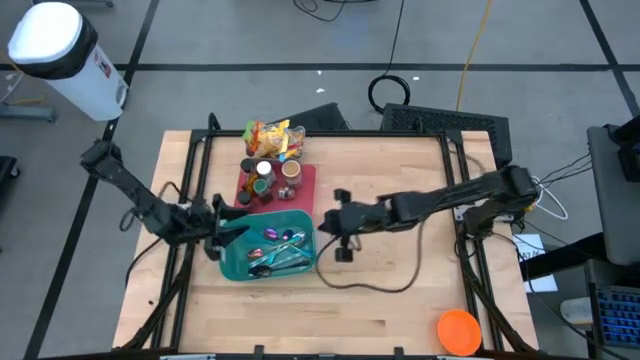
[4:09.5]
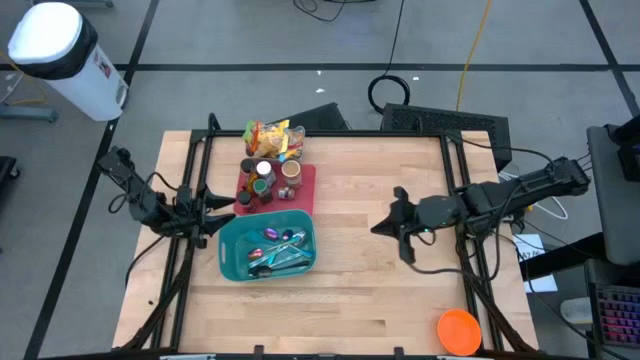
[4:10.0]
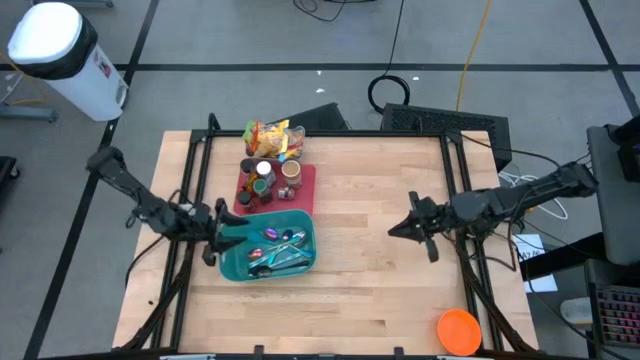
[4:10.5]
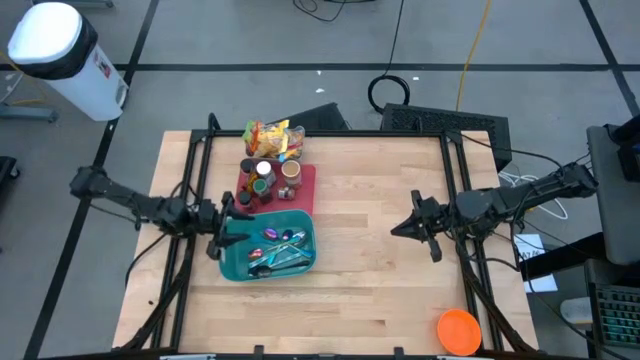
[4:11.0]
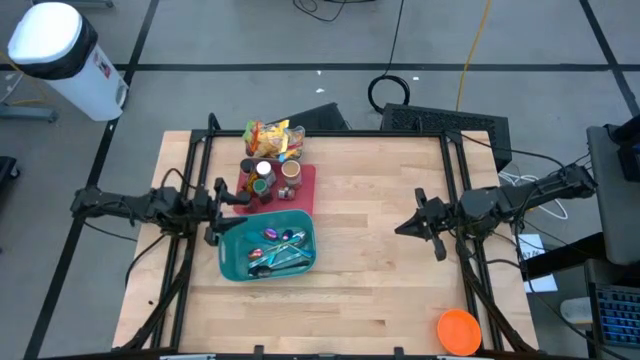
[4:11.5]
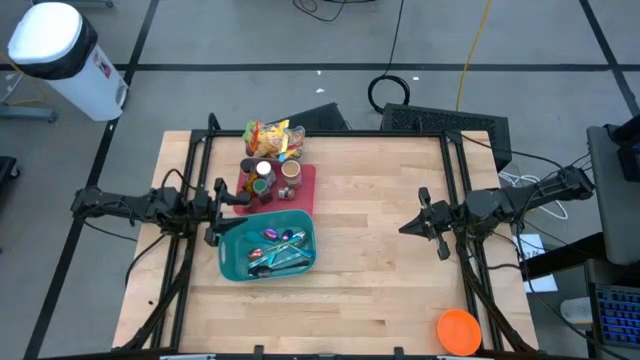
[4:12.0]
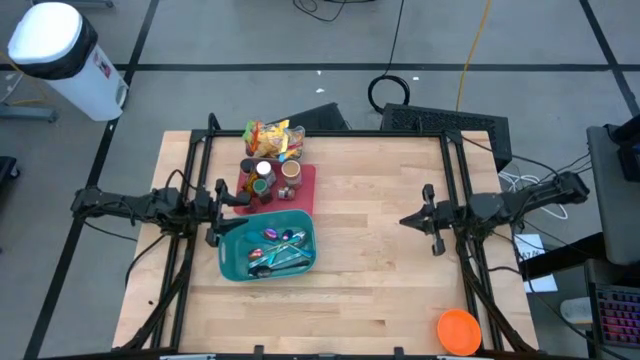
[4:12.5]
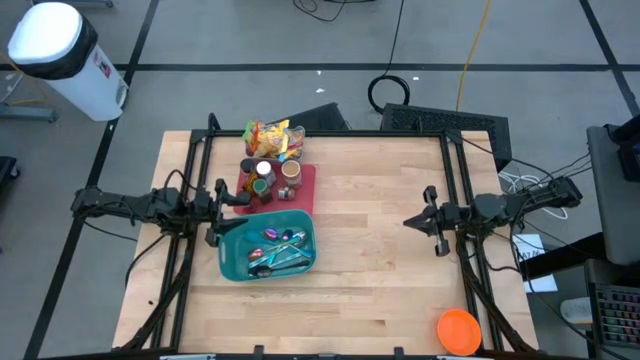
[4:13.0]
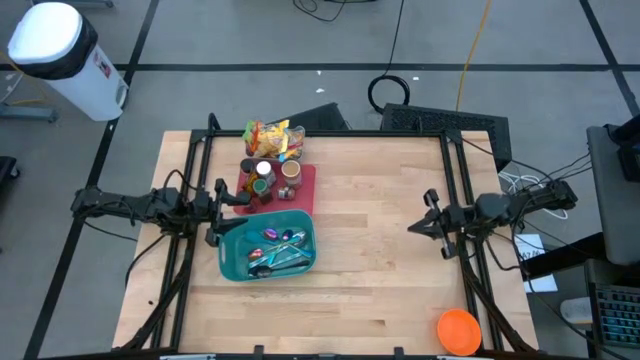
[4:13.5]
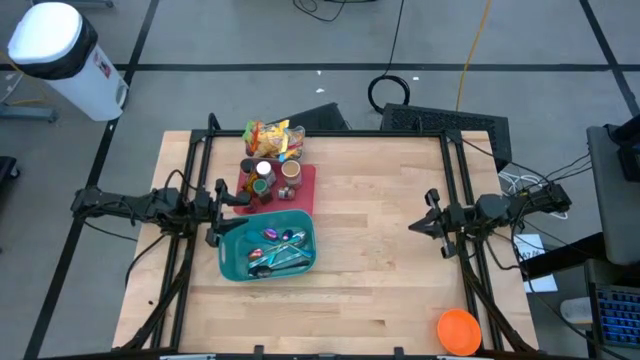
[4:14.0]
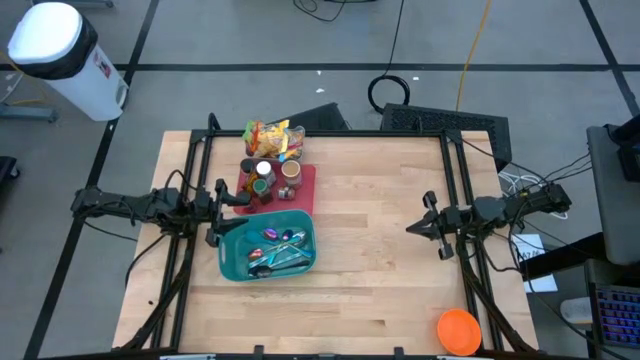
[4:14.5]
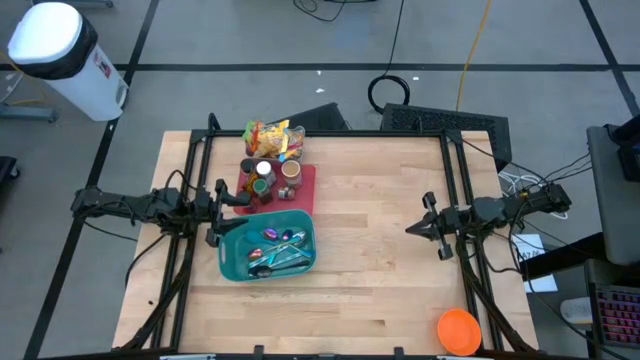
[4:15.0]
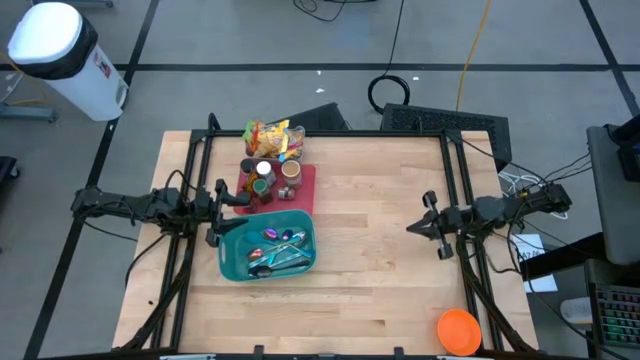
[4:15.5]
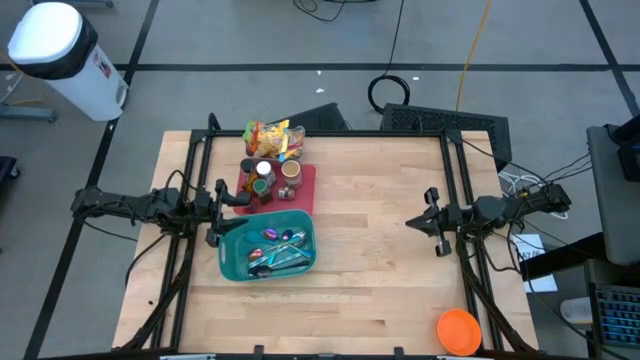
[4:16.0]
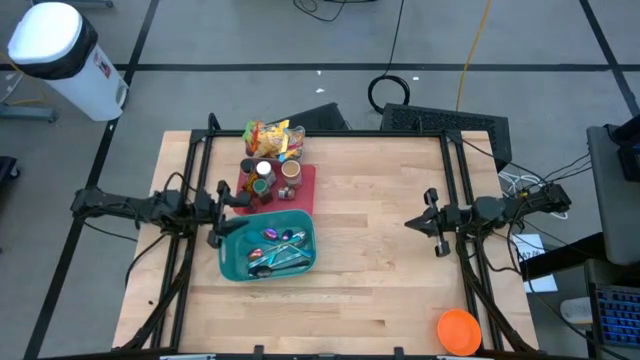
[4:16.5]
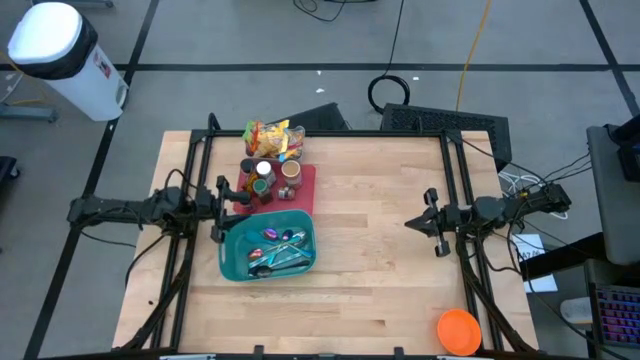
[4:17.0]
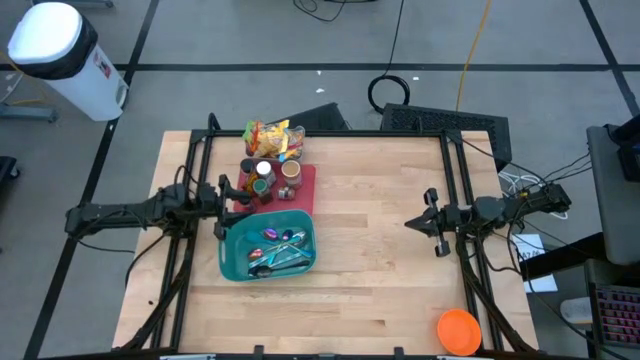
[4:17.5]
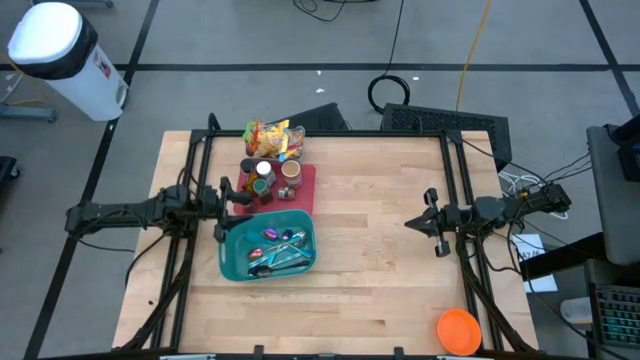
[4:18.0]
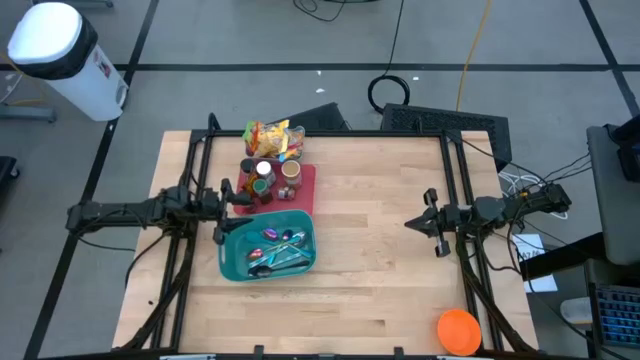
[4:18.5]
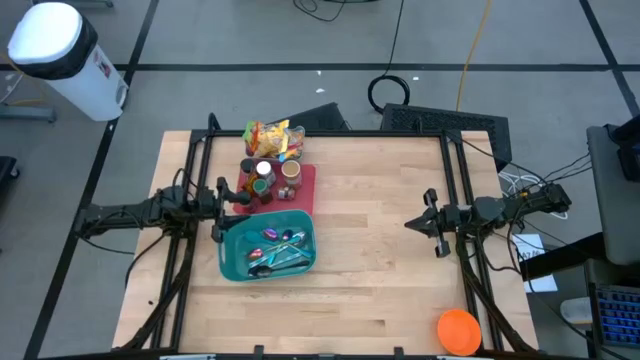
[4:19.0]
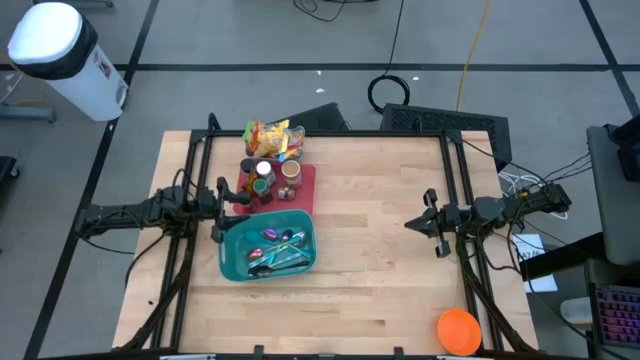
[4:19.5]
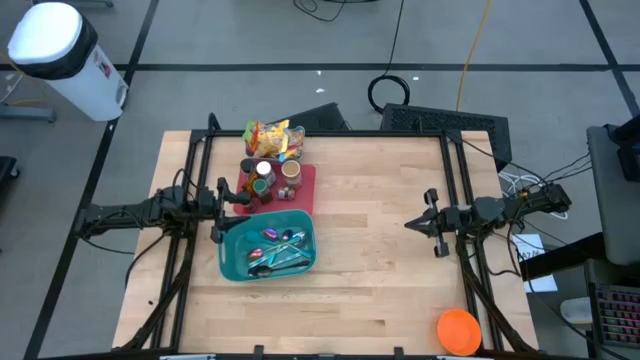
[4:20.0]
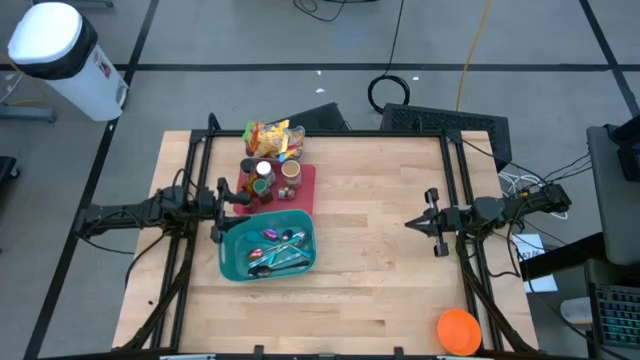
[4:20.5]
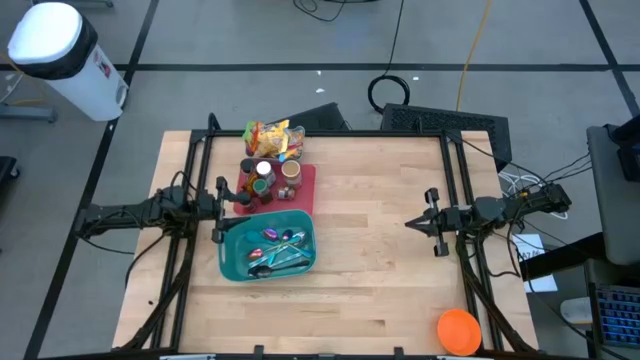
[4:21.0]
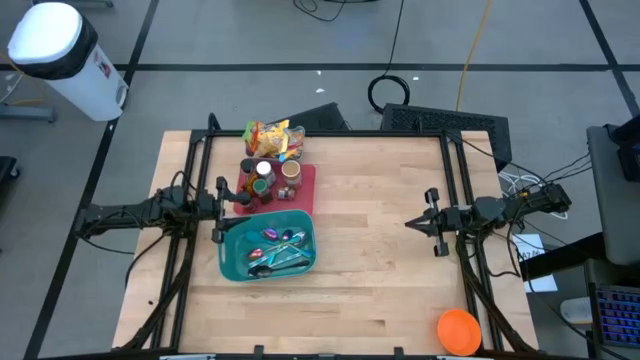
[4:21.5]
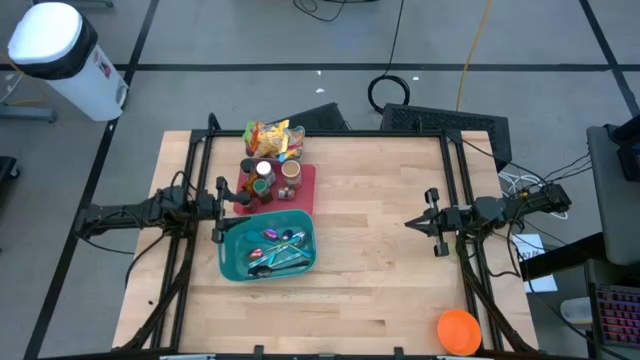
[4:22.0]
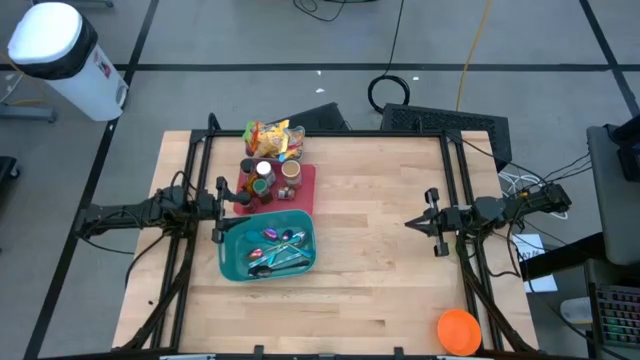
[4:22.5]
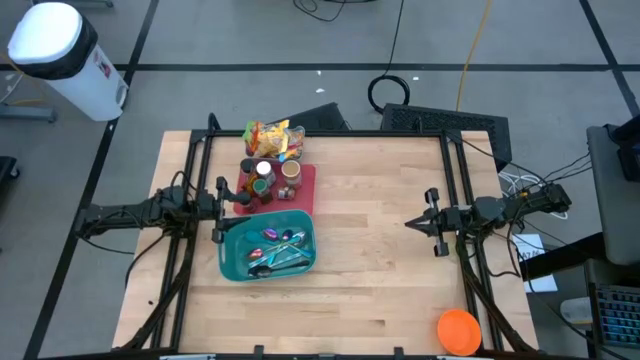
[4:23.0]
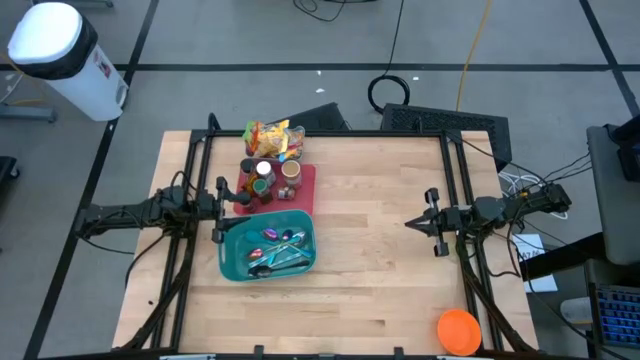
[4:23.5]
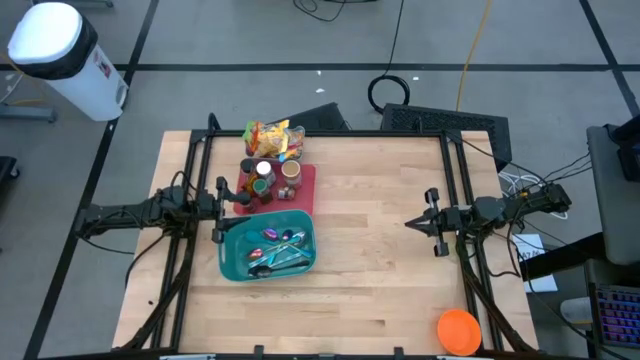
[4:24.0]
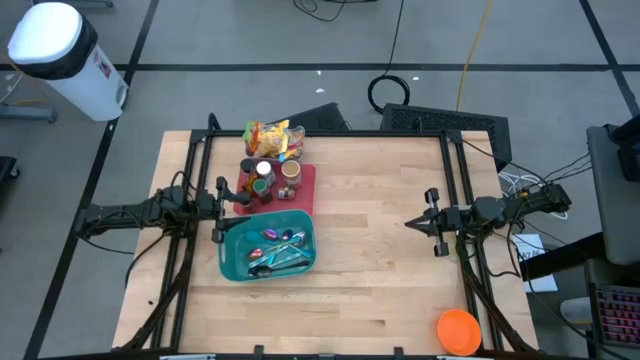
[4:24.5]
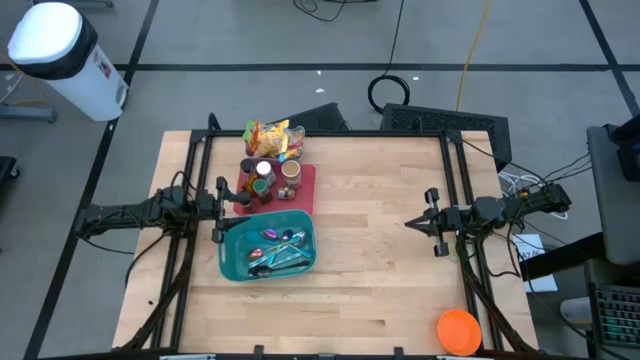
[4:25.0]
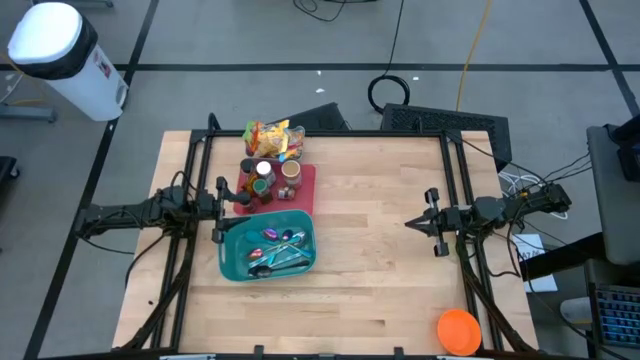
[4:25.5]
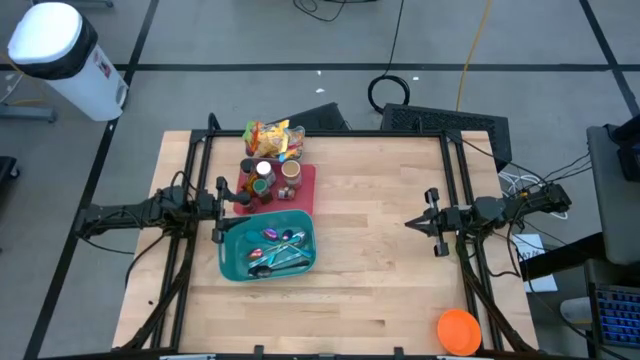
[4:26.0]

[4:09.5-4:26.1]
Task: Pick & Place Food Item
Return to Home Position

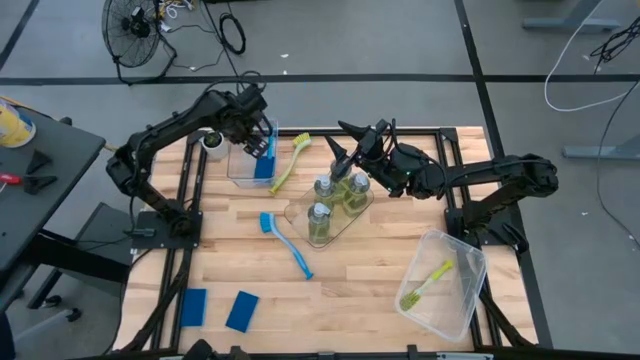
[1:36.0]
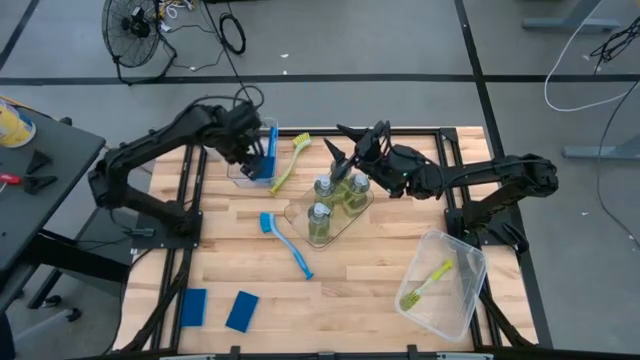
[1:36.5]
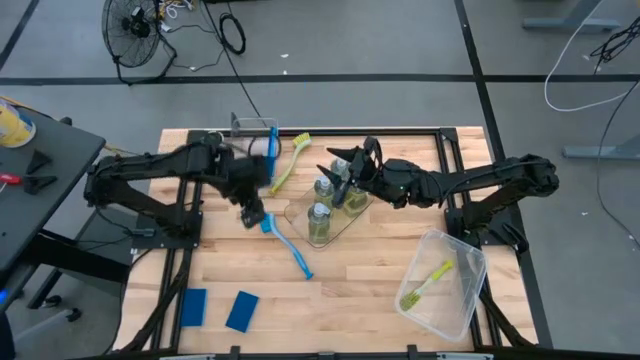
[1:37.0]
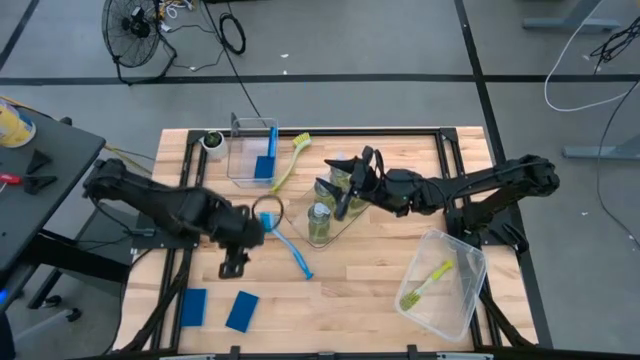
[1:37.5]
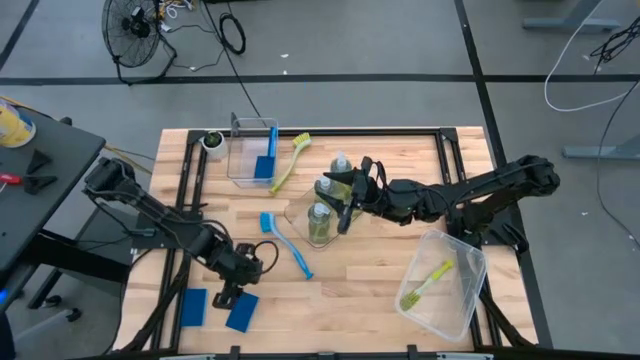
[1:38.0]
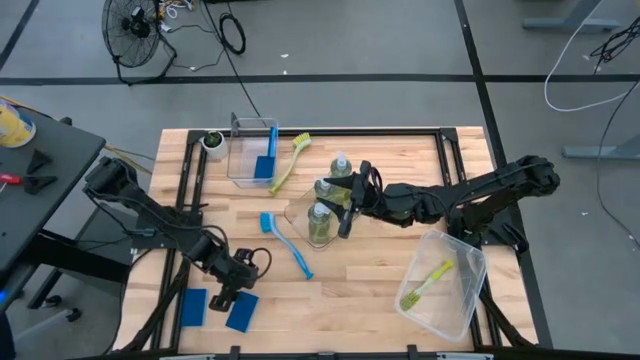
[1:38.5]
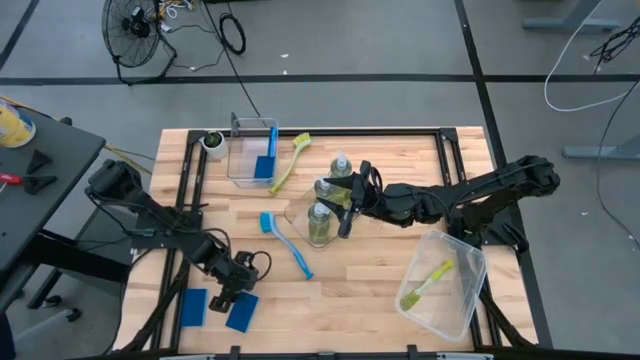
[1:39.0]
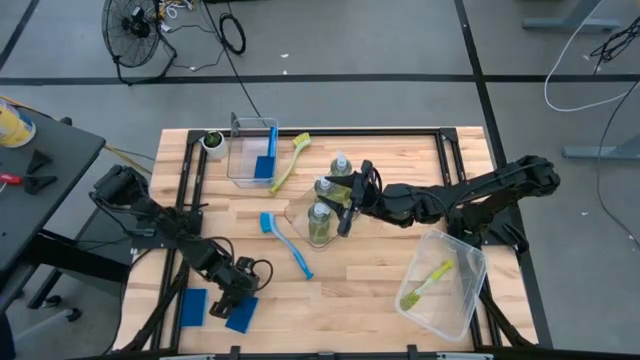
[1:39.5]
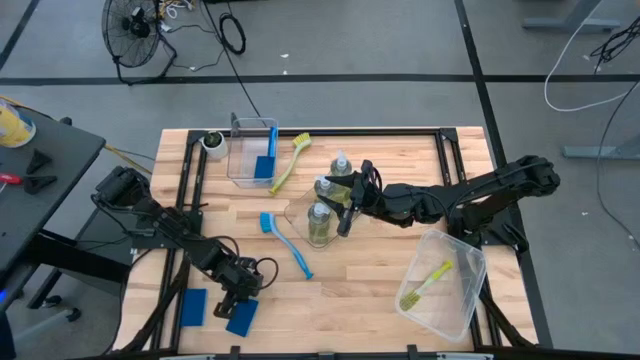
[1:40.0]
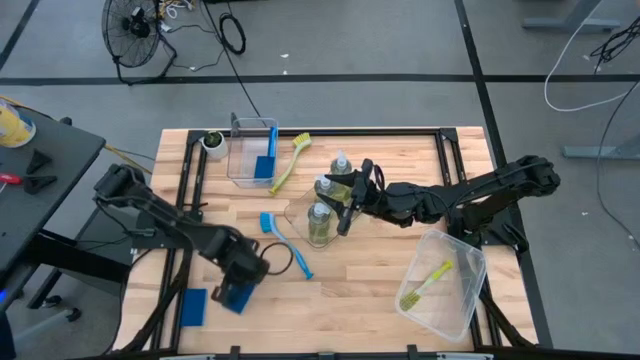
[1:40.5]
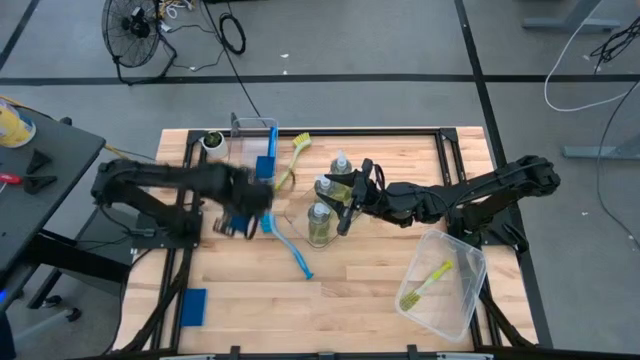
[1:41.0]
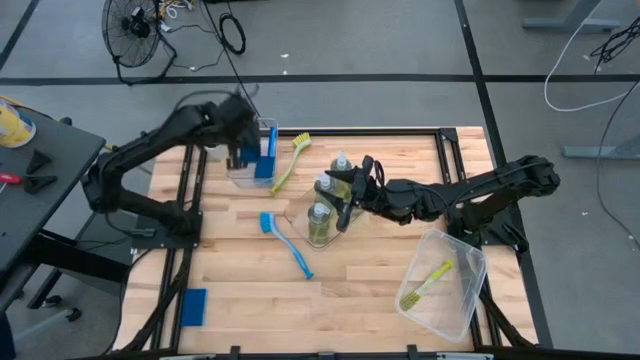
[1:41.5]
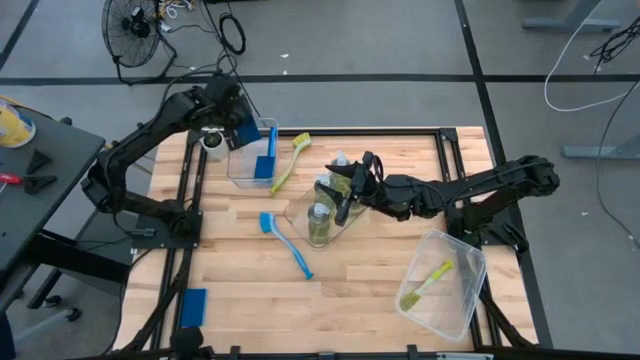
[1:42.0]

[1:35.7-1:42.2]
Task: Pick & Place Kitchen Sink Supplies
Put the blue sponge into the top transparent bin
